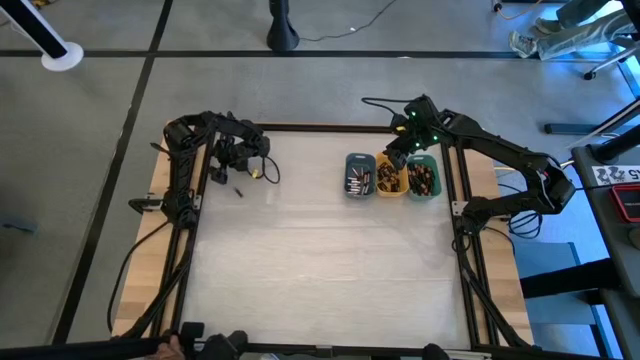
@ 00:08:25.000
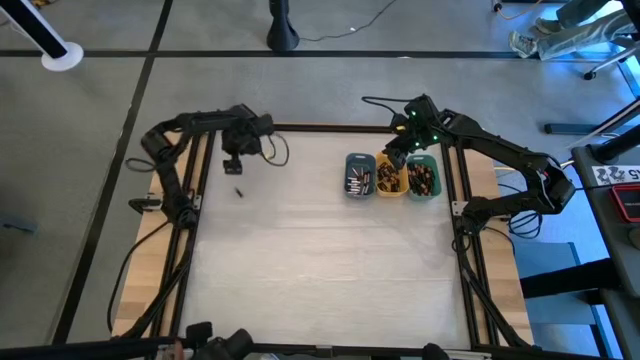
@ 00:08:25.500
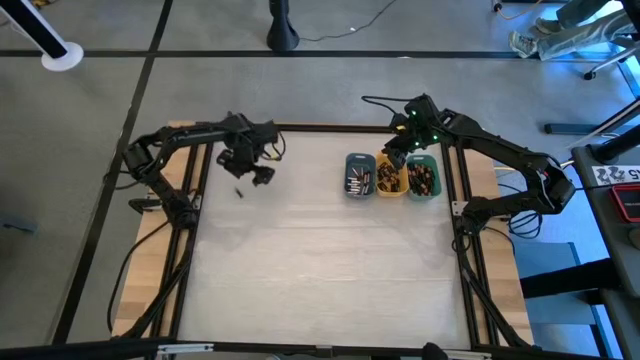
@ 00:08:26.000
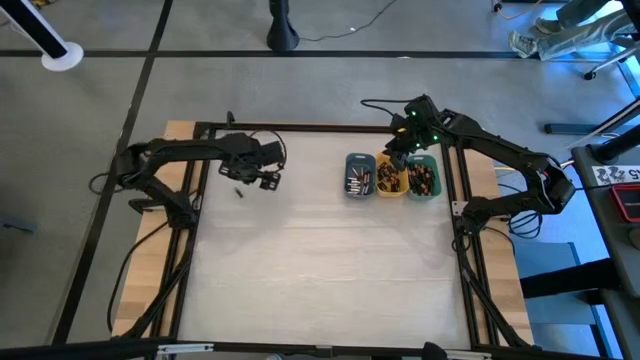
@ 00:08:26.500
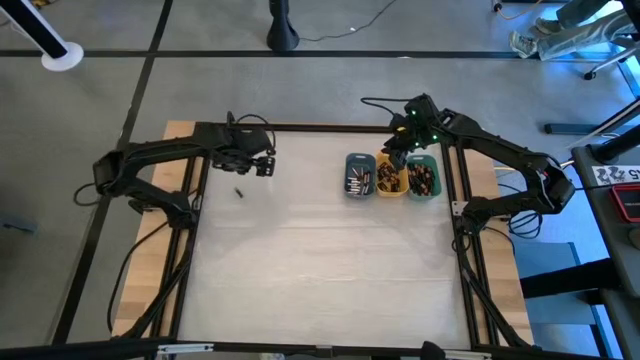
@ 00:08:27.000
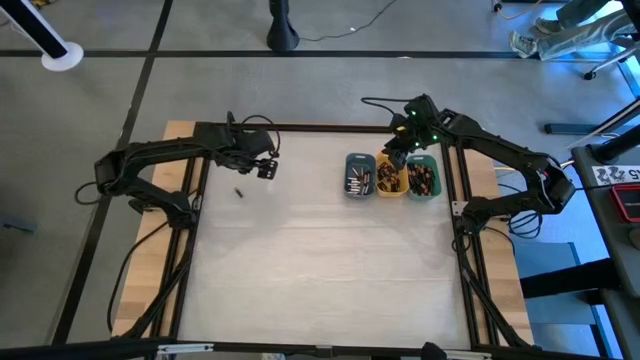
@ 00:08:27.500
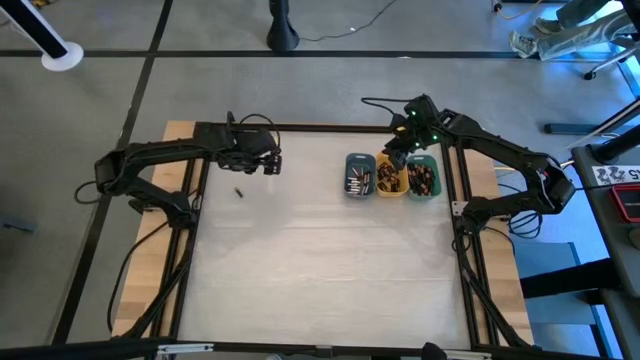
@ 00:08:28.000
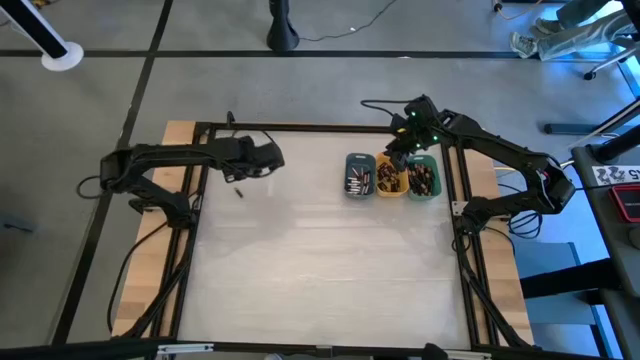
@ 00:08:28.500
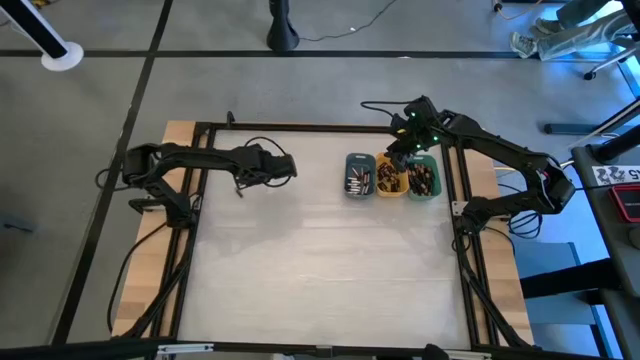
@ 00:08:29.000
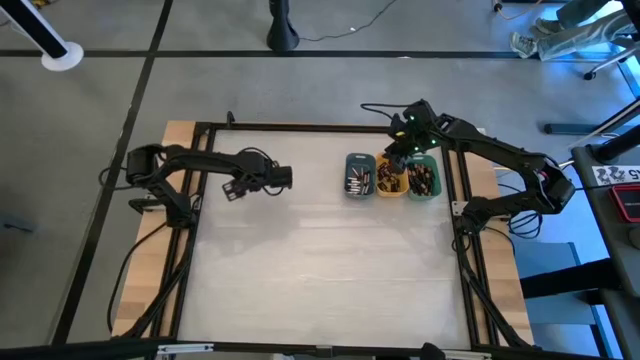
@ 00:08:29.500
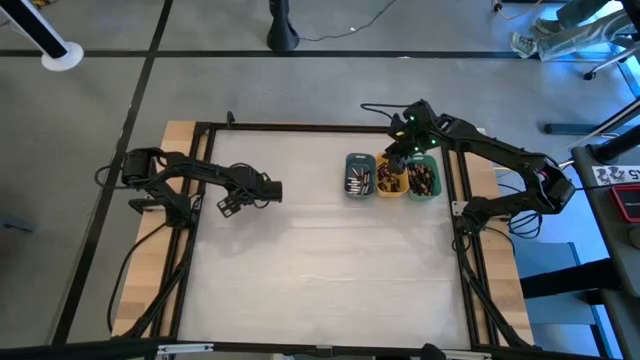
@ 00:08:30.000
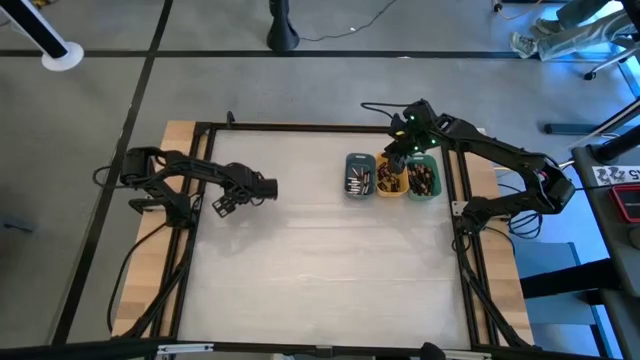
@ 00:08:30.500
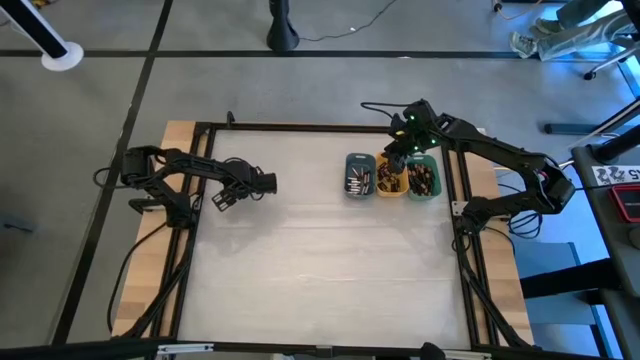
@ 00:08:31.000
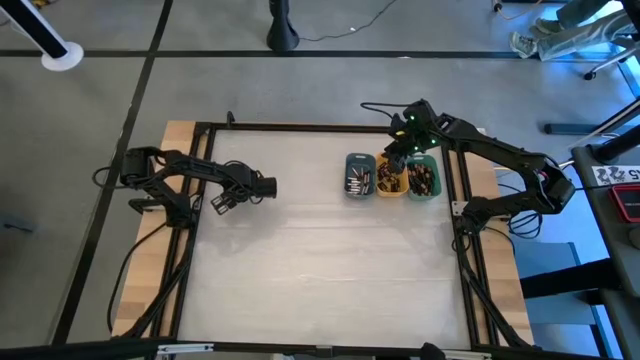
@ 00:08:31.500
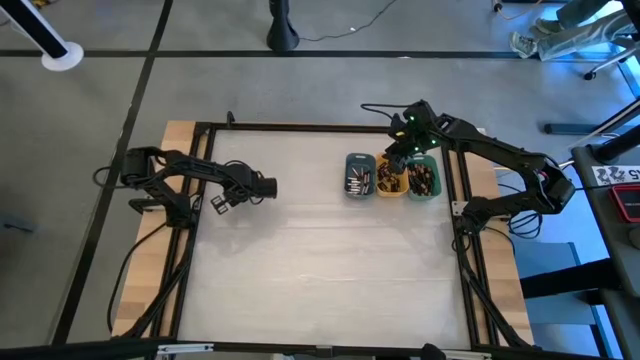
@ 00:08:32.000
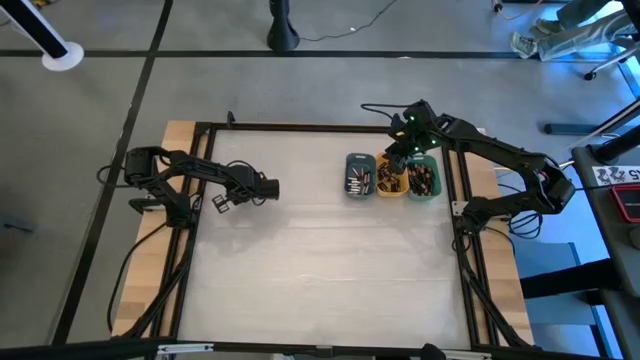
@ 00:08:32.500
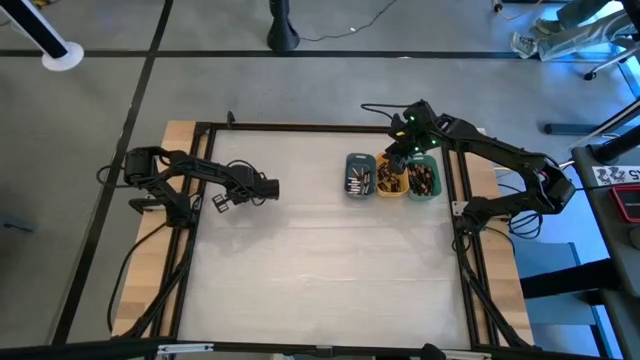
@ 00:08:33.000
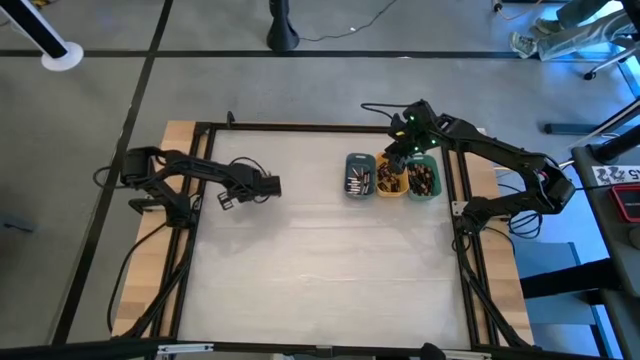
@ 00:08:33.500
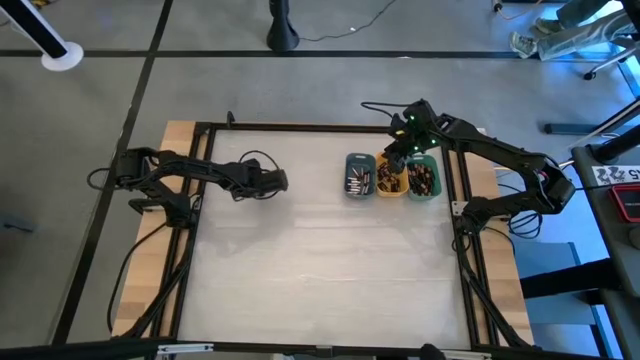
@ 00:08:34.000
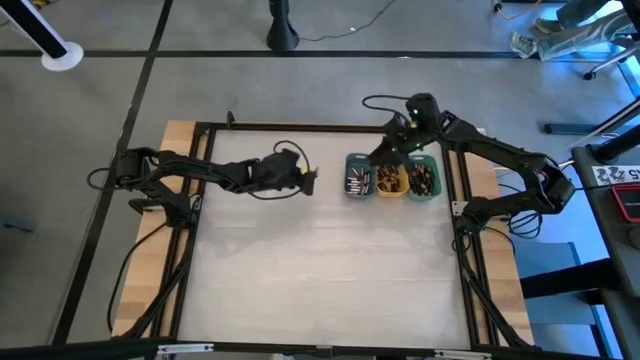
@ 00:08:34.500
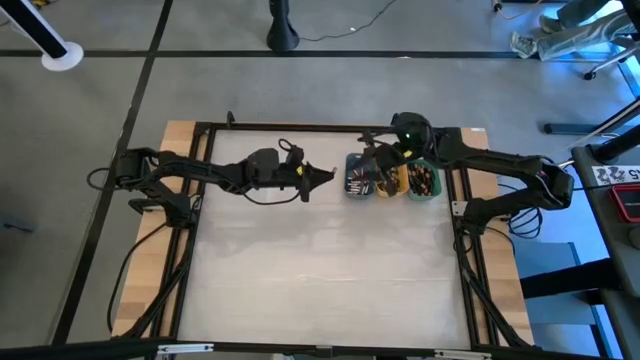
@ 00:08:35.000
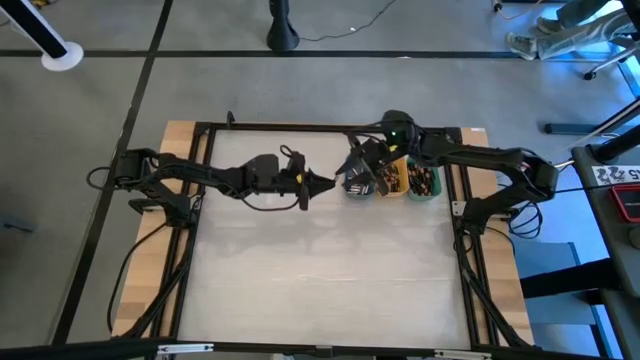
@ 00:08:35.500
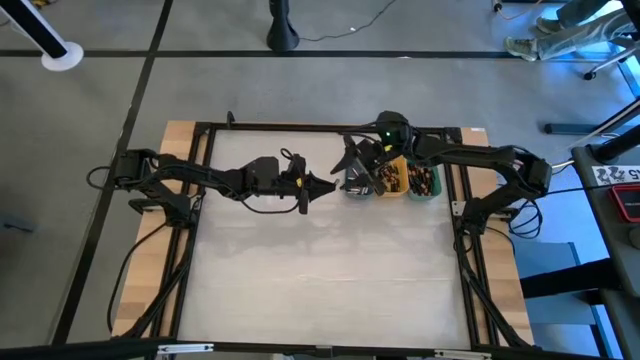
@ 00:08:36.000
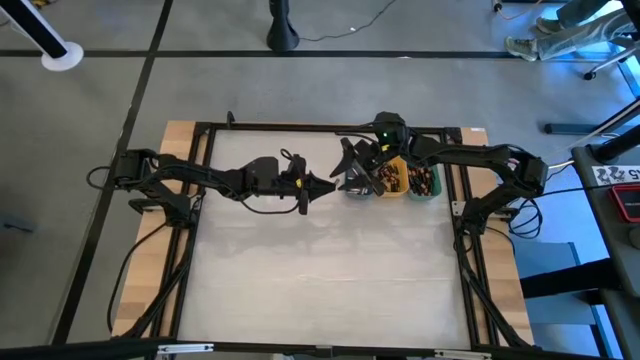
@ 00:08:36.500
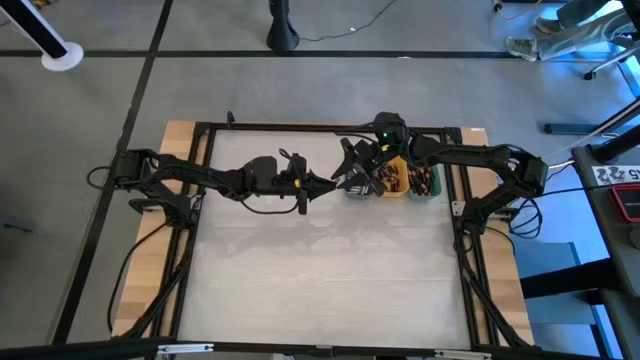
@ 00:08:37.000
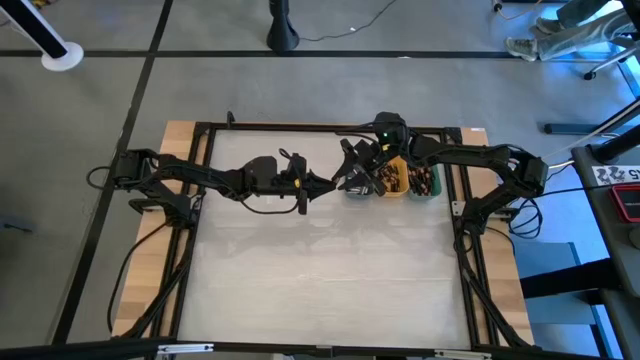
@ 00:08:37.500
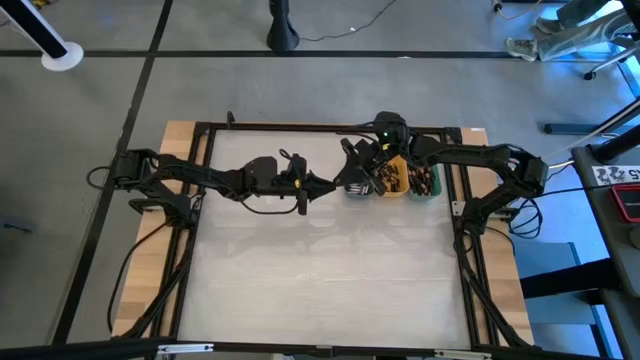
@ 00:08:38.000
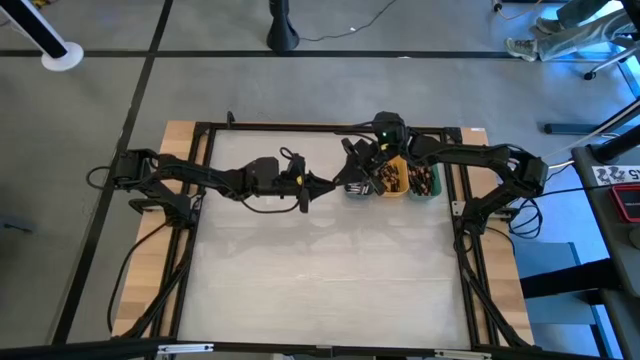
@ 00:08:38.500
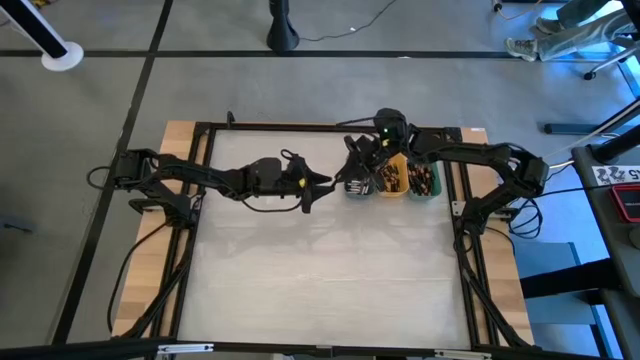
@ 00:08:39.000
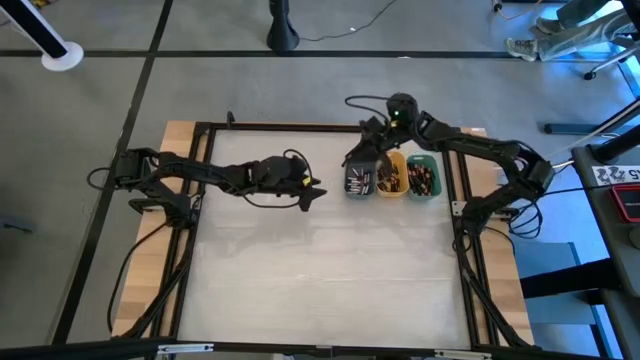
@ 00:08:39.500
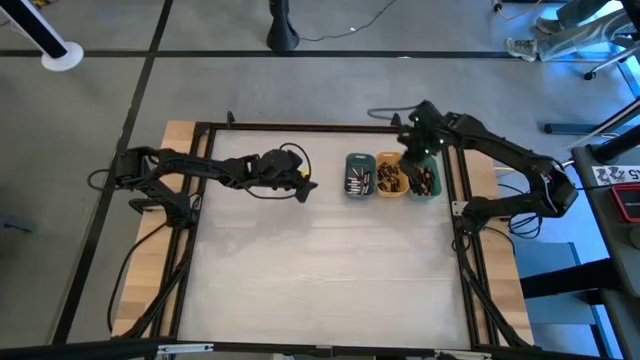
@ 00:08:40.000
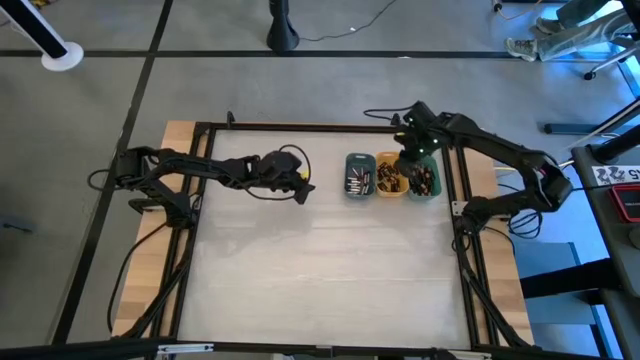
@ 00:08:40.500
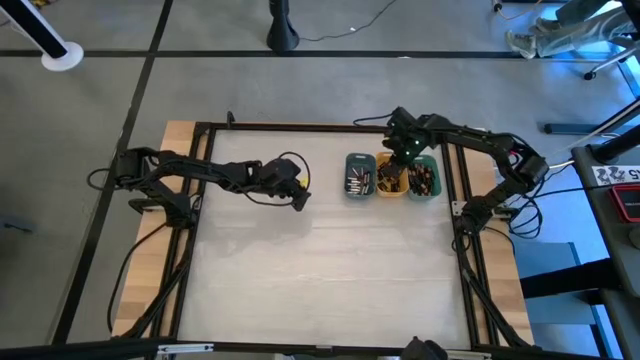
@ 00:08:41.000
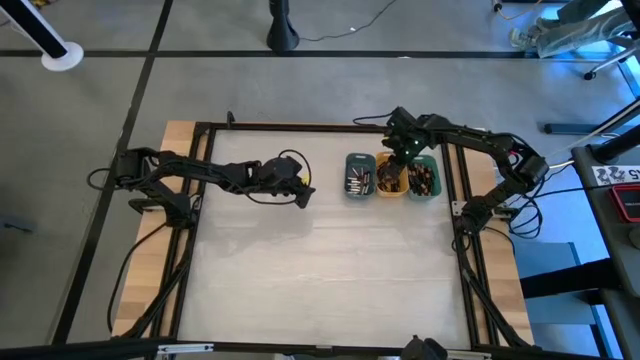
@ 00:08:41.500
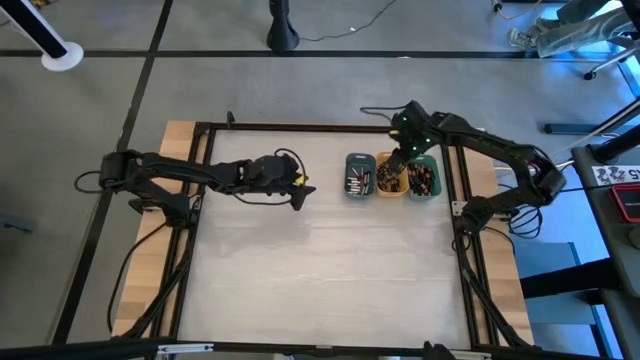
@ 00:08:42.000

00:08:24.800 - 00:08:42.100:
Task: Sort batteries
Put the black battery into the yellow bin

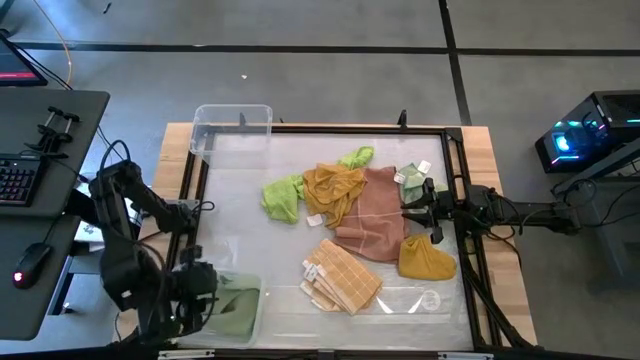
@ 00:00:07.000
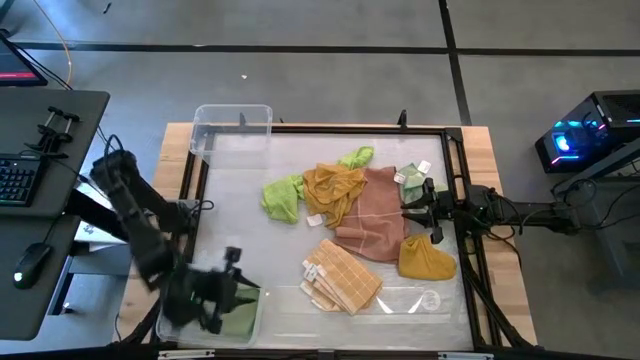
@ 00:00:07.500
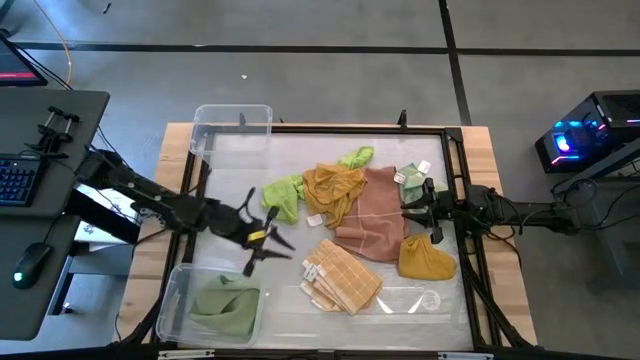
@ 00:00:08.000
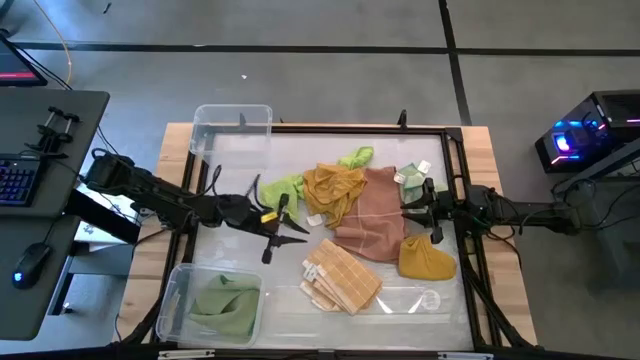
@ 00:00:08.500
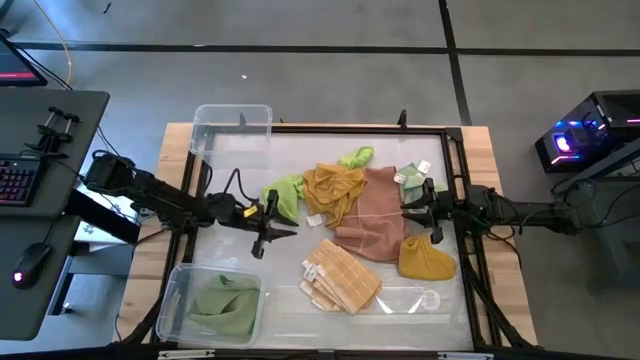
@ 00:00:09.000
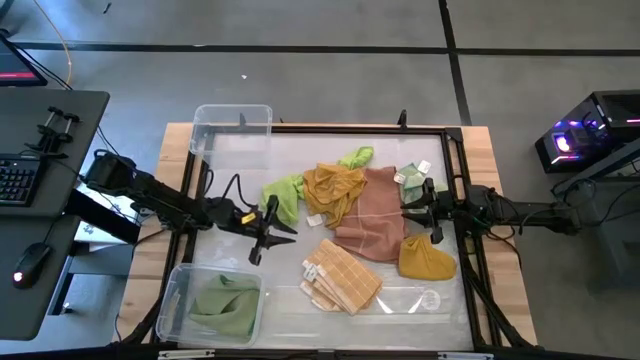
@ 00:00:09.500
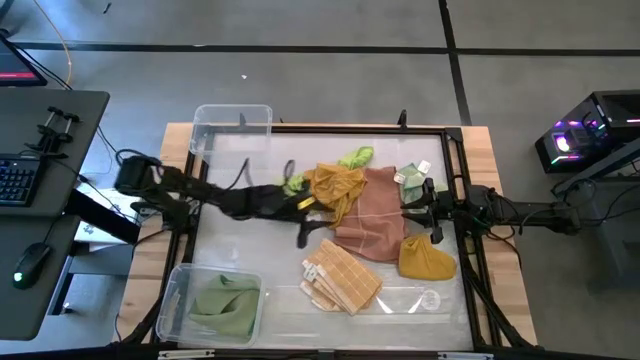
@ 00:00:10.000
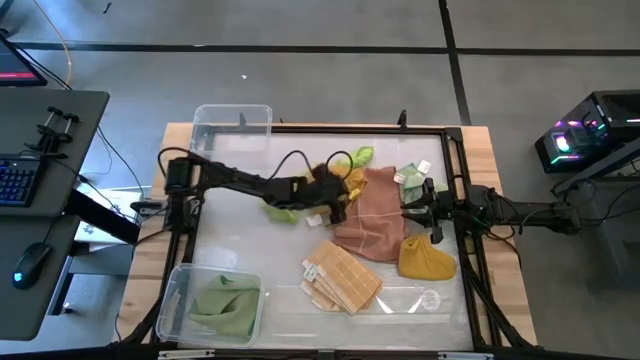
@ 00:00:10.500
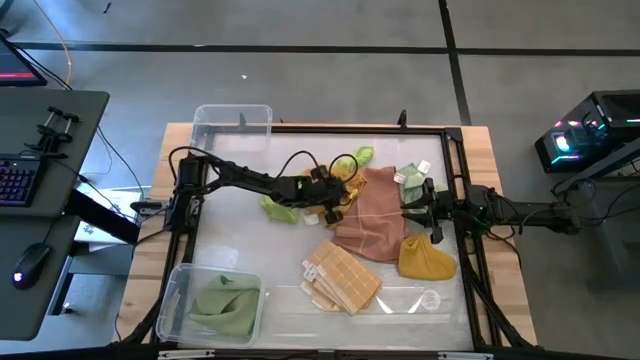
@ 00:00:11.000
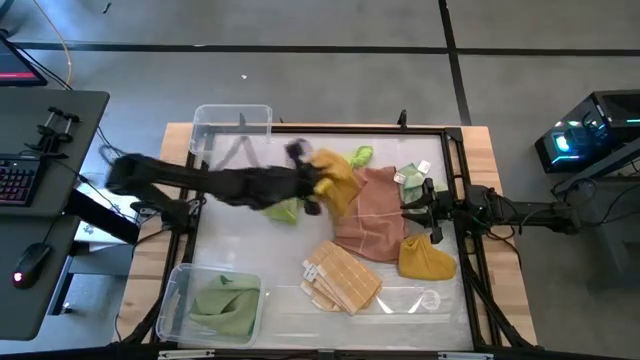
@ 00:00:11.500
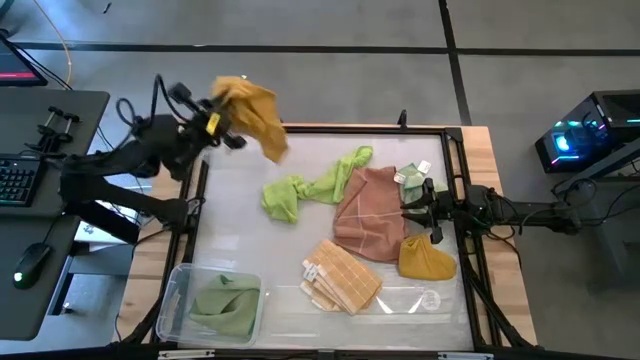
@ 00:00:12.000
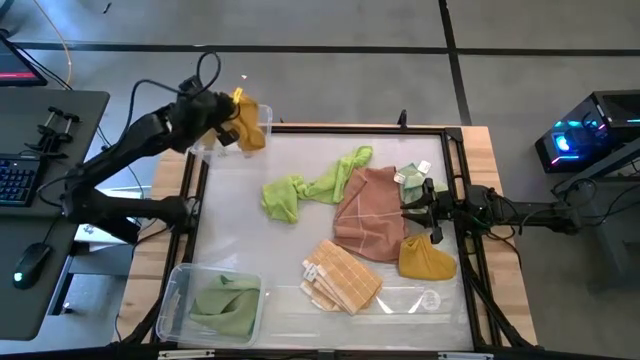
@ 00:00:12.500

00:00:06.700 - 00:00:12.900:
Task: Sort towels by color in basket
Put the yellow towel into the top transparent bin
